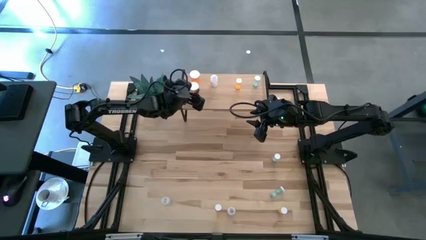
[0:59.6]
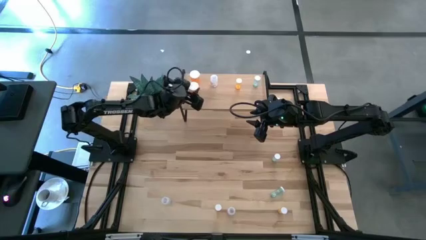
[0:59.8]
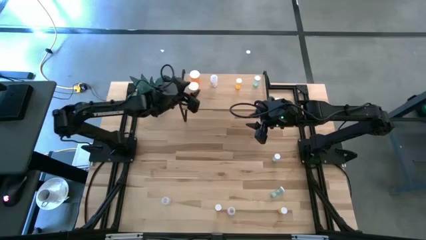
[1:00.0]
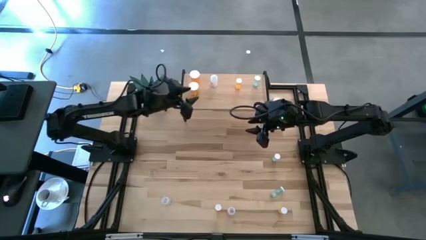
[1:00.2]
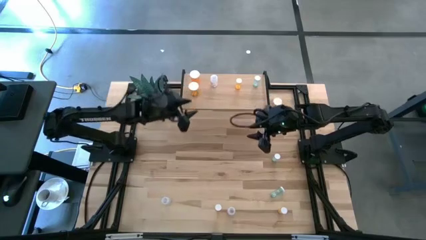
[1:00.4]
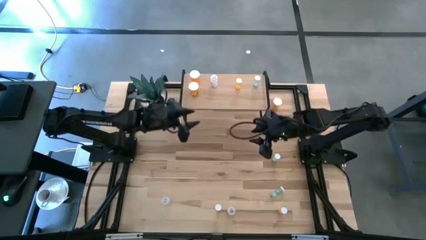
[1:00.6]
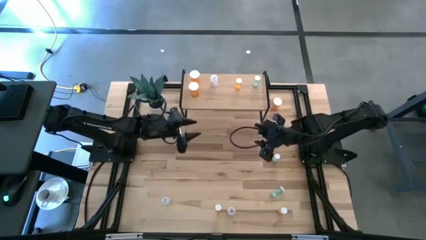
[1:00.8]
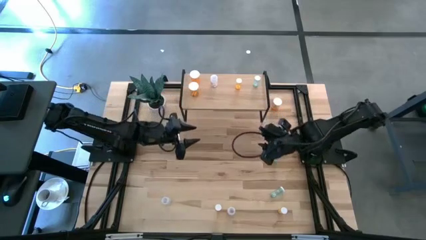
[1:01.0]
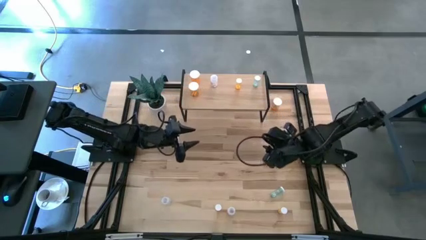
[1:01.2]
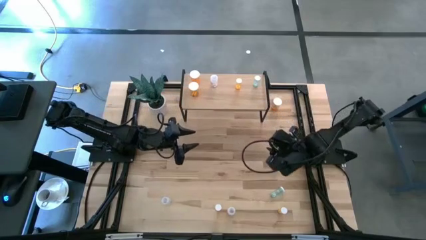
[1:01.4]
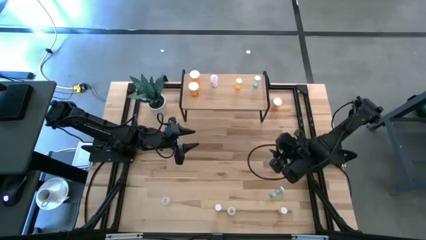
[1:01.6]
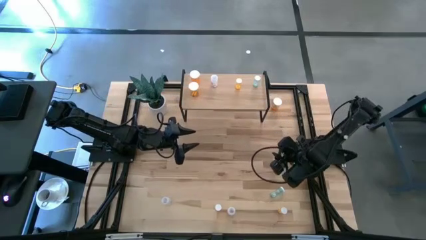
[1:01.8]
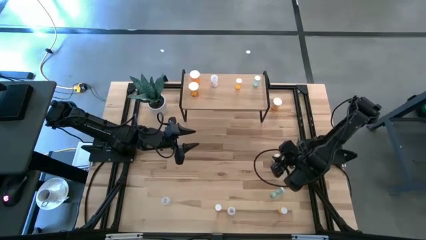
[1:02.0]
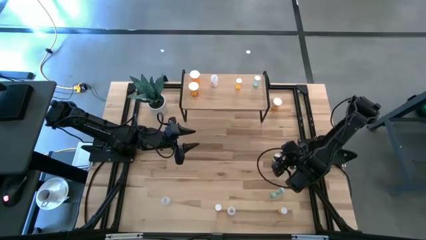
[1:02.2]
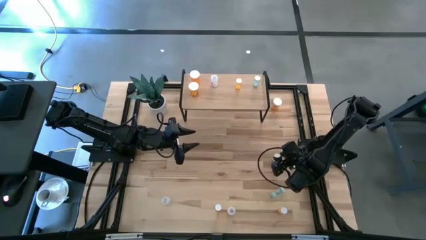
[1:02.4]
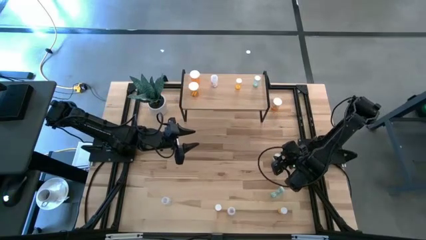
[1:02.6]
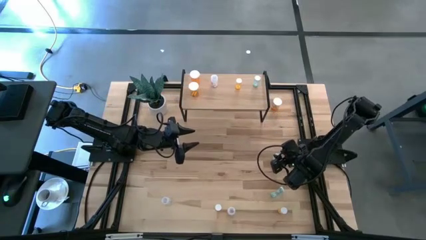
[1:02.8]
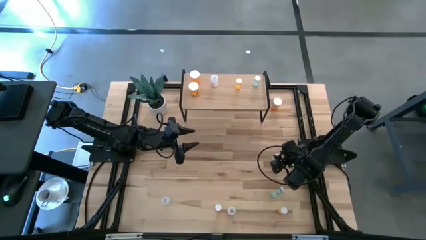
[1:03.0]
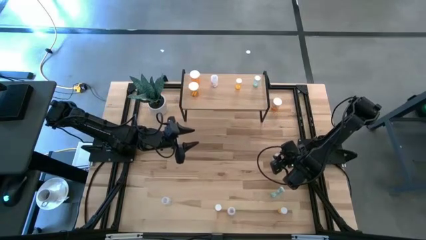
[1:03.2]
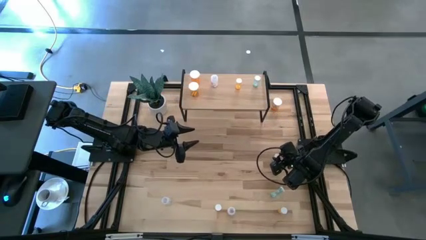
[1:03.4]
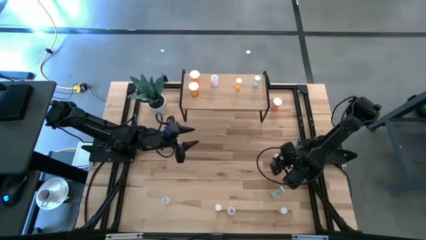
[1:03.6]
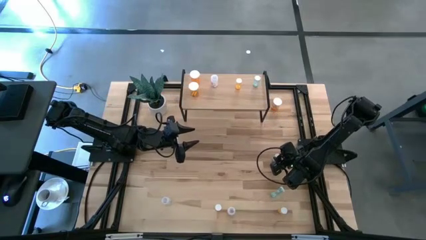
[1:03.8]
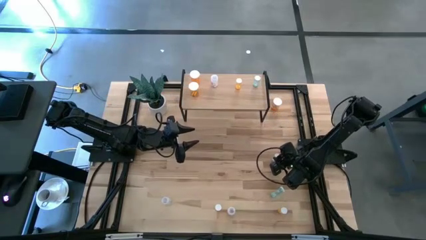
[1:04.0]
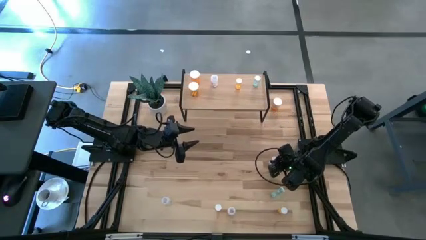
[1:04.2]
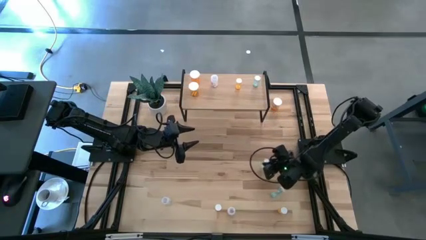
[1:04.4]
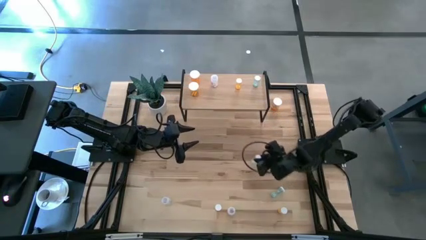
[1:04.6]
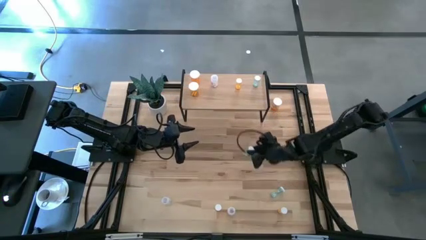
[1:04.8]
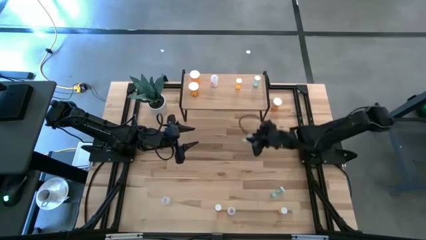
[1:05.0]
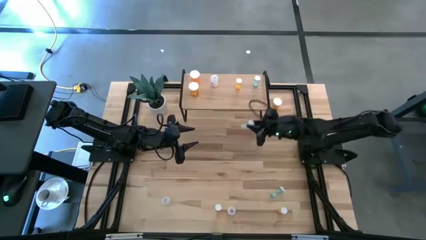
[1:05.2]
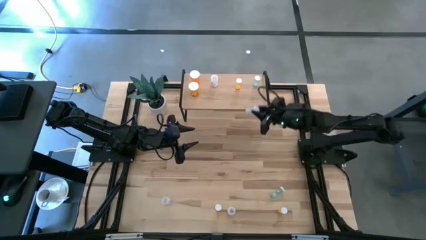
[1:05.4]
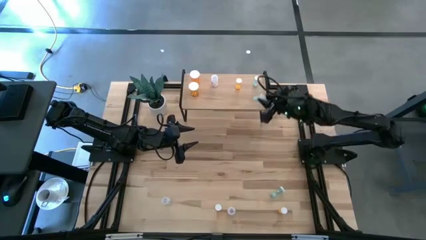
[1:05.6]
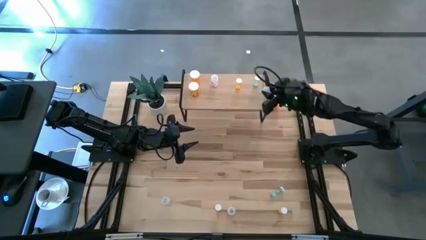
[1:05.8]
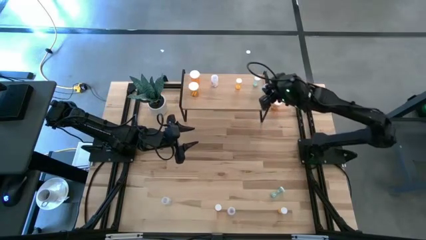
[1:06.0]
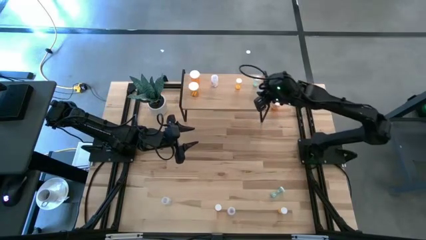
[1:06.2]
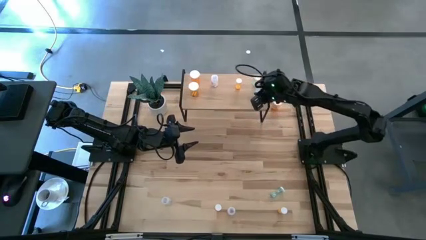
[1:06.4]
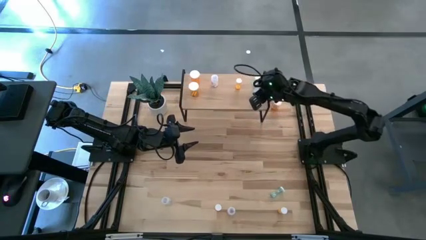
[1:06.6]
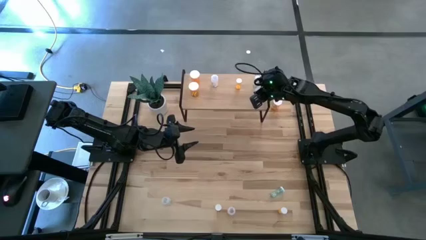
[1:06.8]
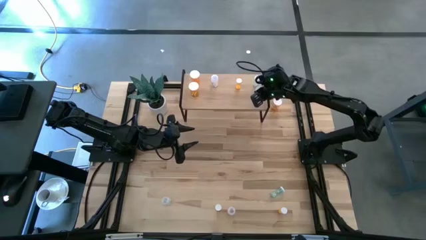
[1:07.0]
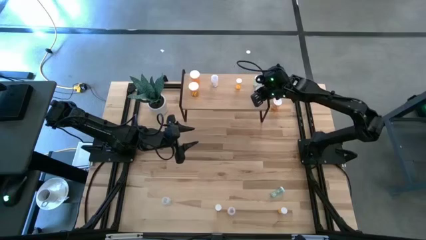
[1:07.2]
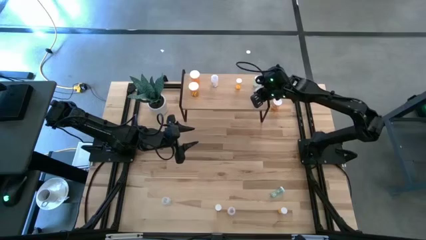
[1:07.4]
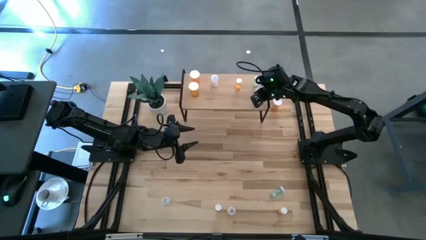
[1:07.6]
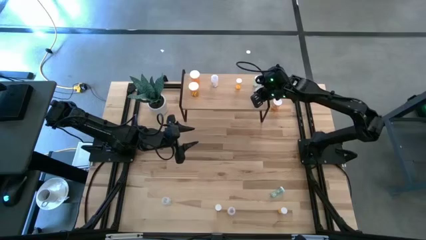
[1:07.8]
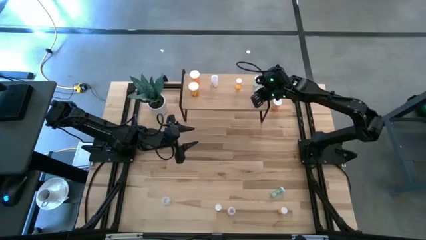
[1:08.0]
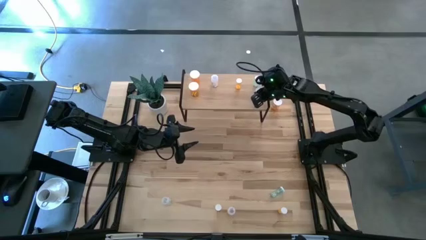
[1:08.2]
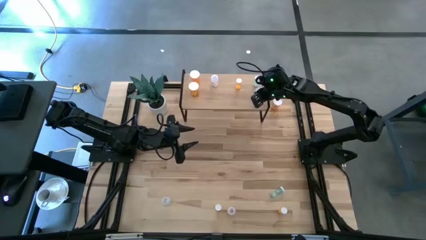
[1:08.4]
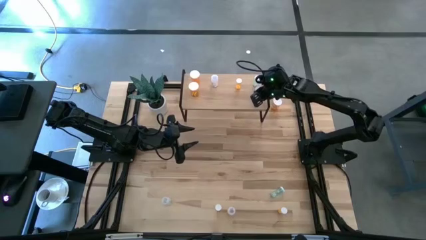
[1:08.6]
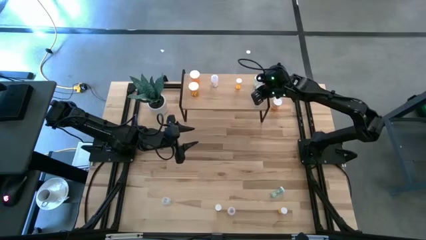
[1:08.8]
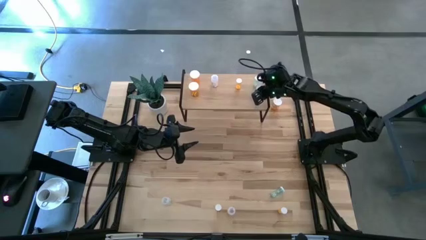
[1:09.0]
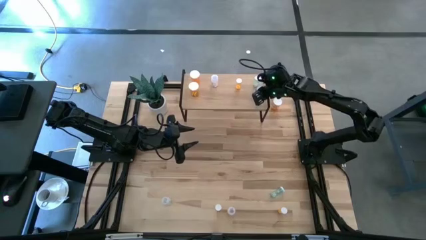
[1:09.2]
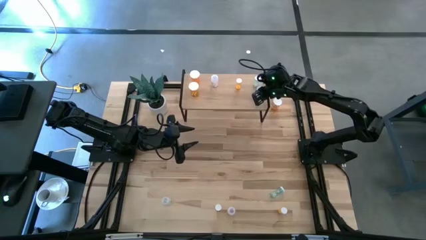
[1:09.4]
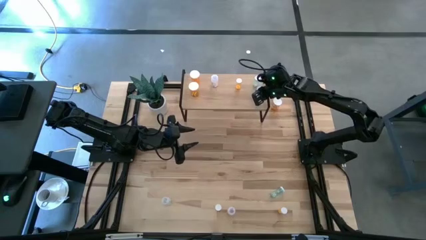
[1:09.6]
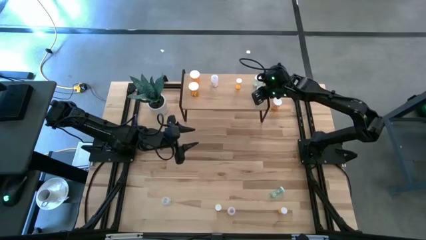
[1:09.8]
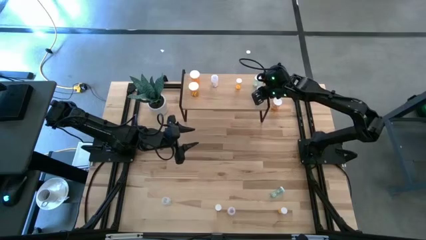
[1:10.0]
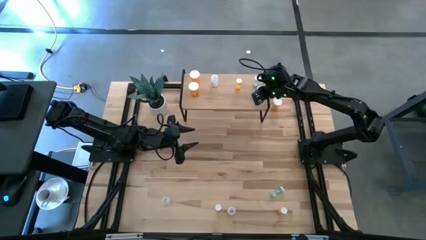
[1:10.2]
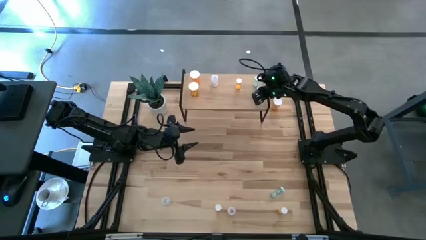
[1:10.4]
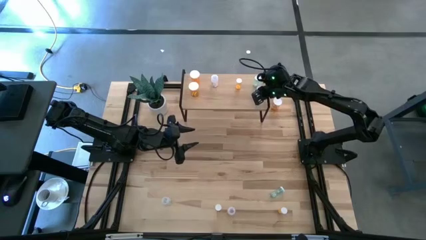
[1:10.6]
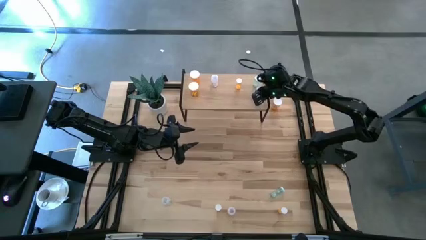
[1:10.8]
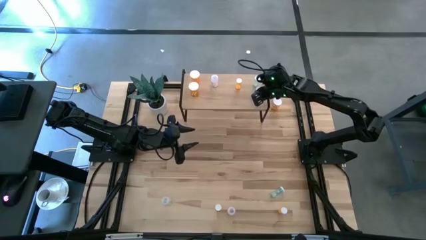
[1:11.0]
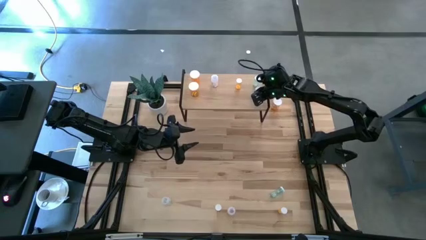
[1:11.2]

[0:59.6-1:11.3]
Task: Pick and place medicine bottles onto shelf by color
Put the top green pill bottle aligned with the other green pill bottle on the shelf
